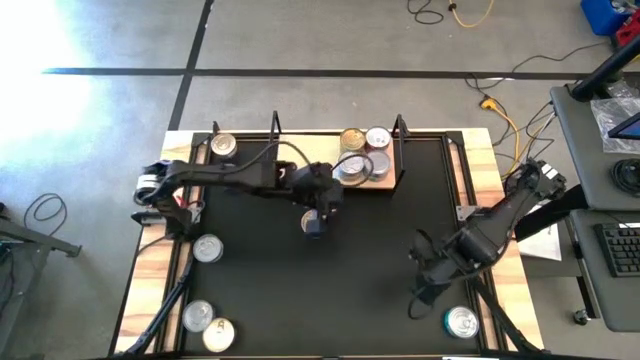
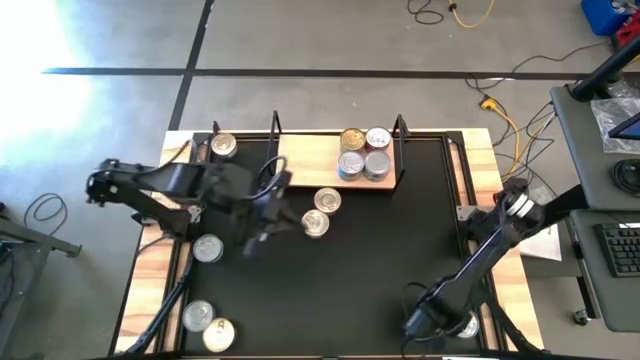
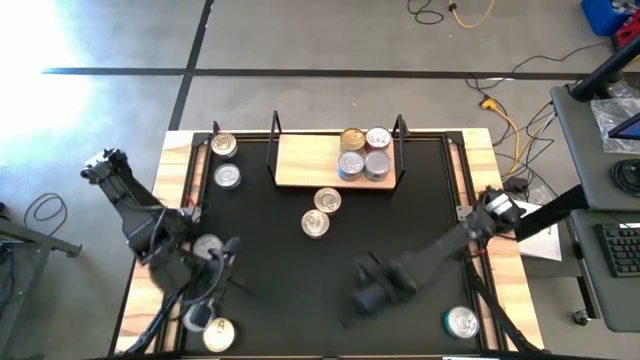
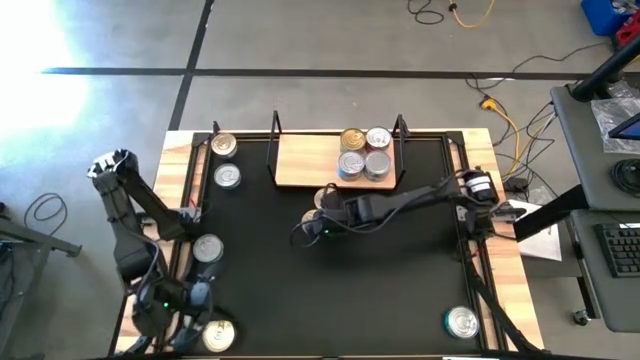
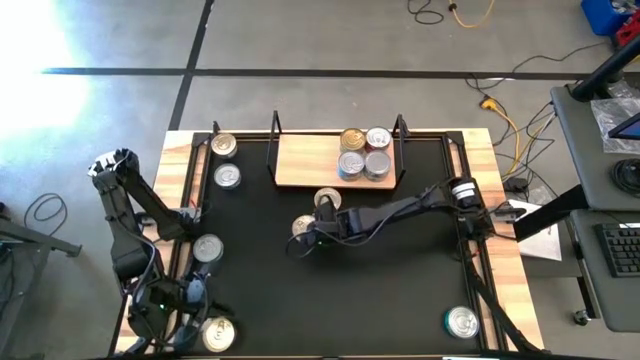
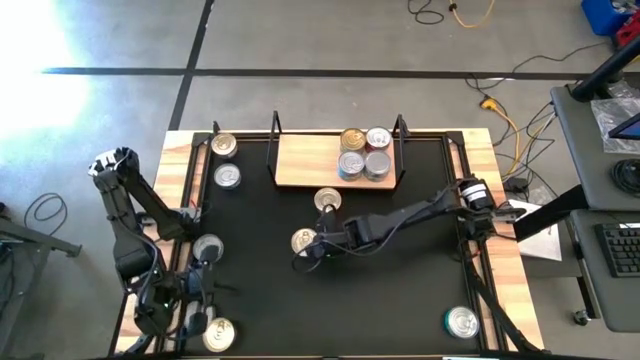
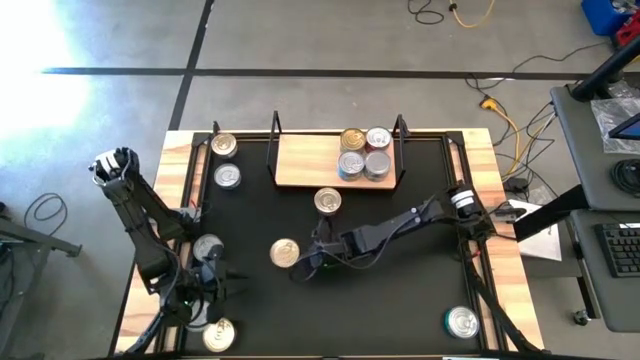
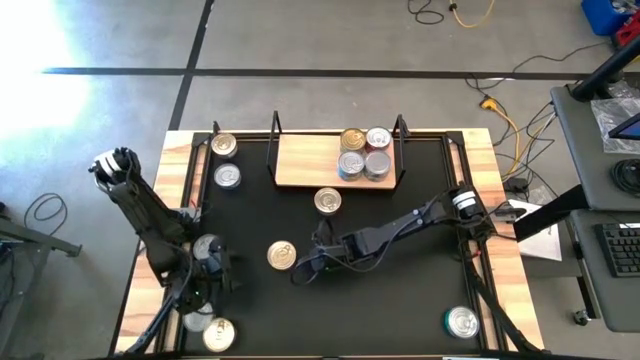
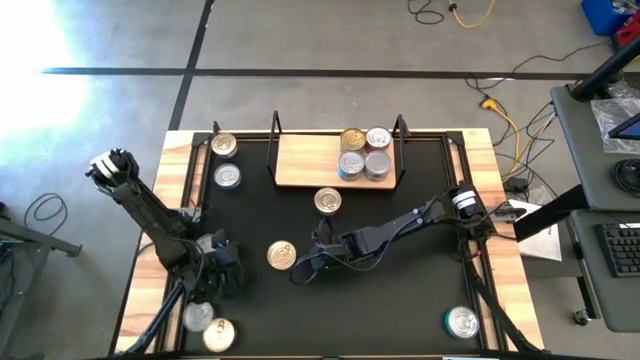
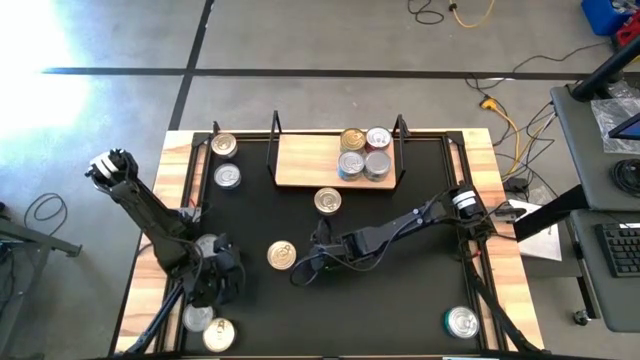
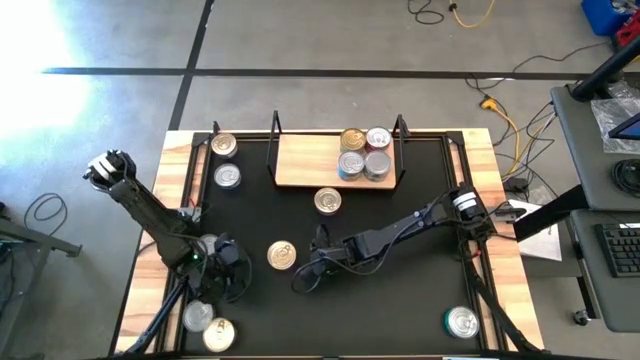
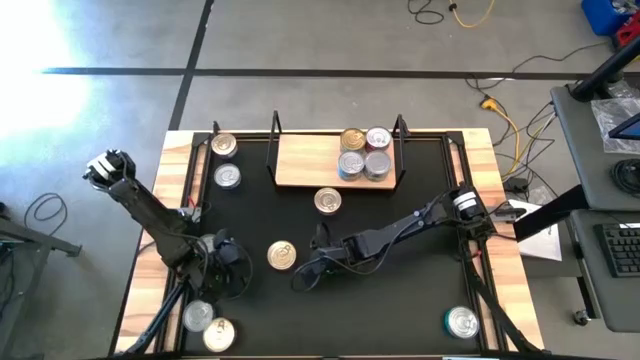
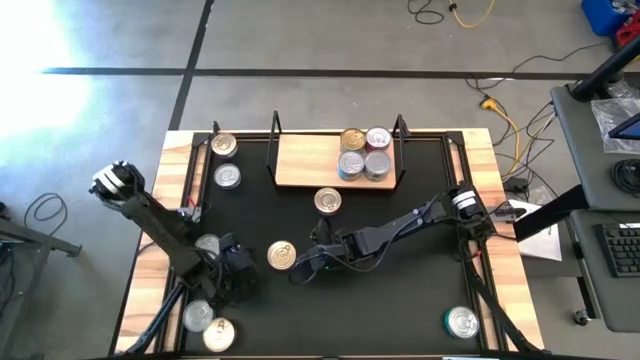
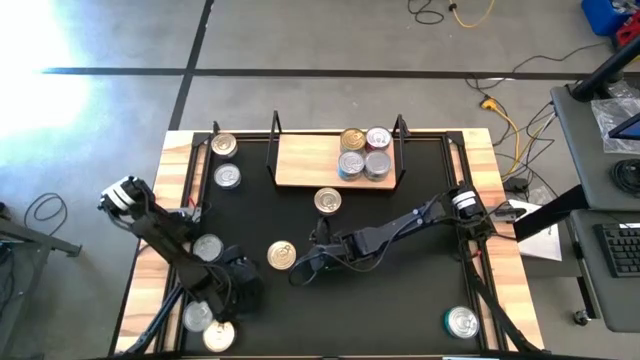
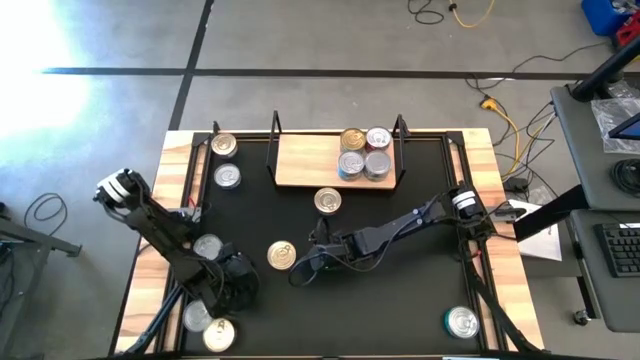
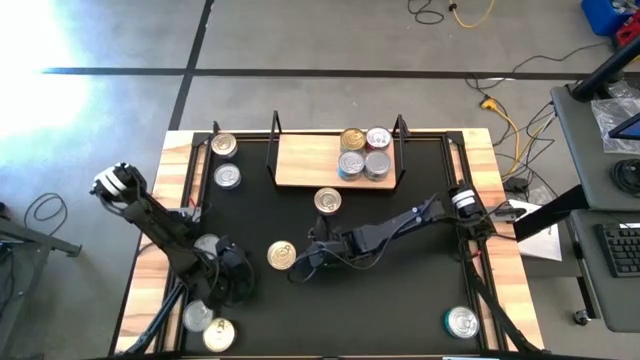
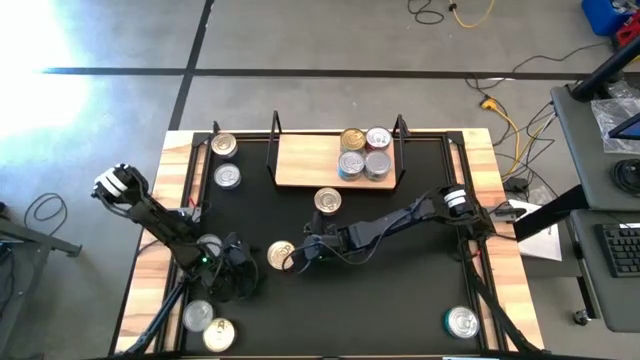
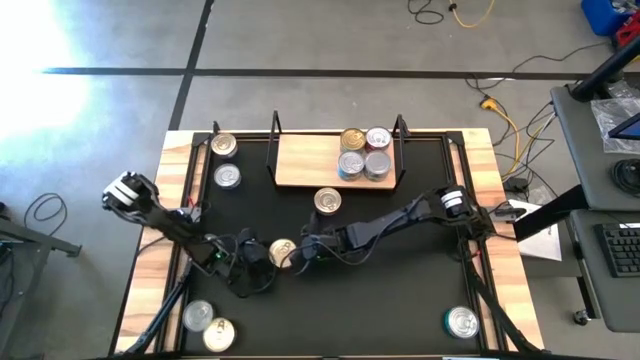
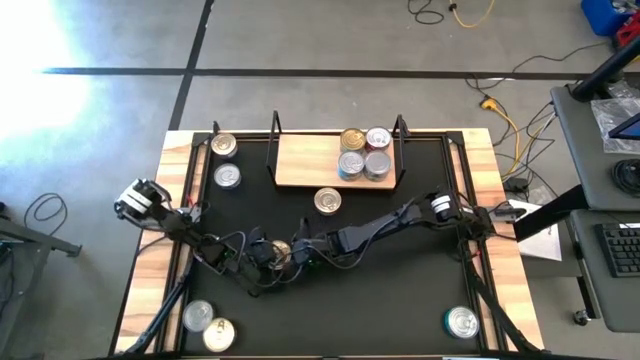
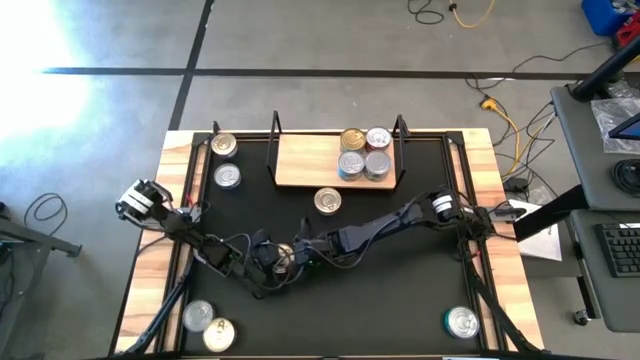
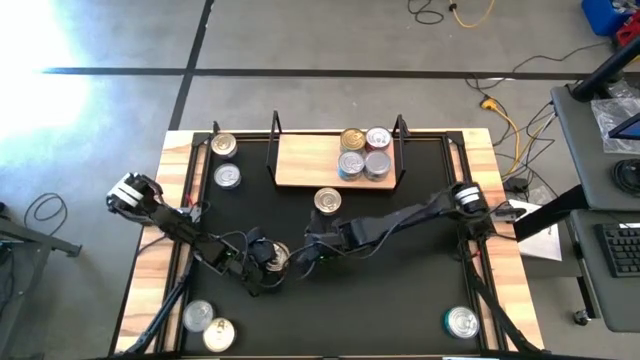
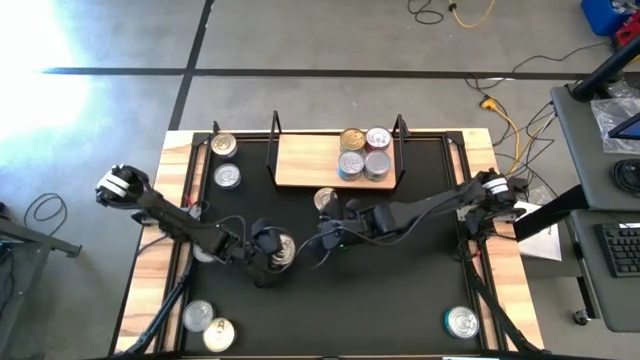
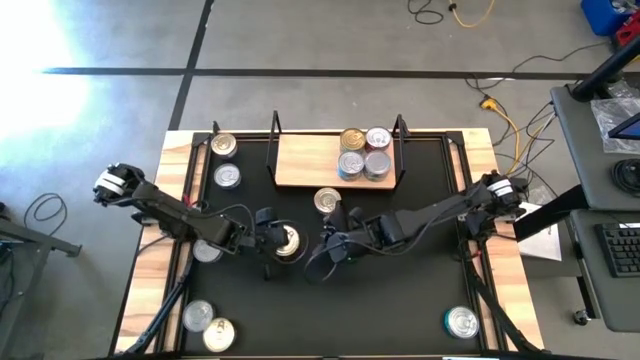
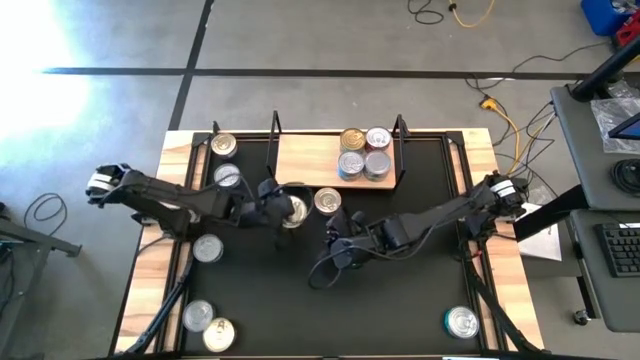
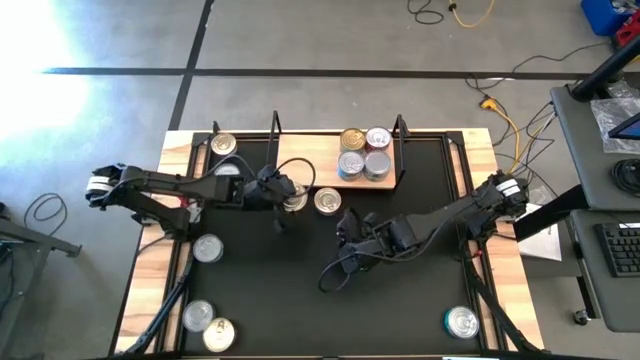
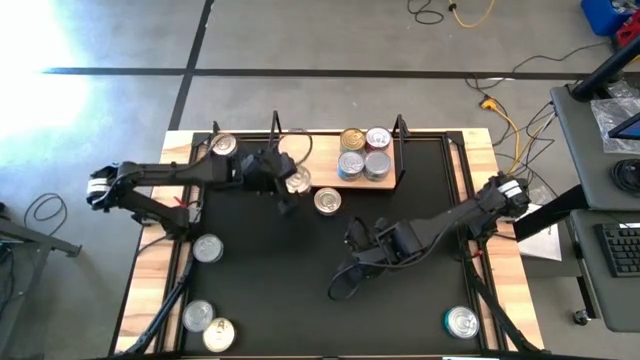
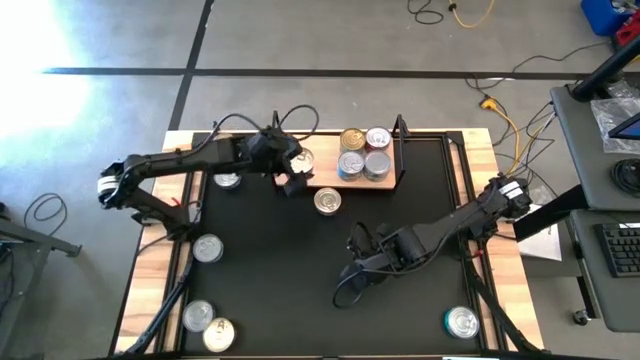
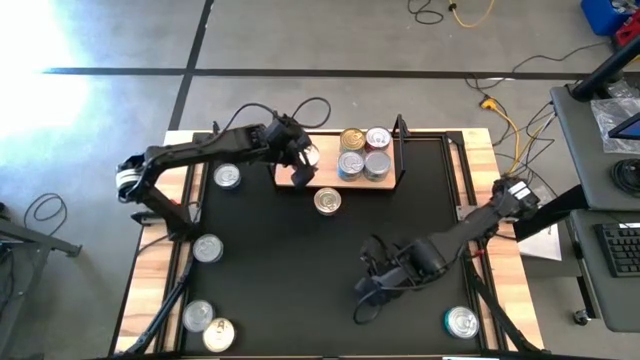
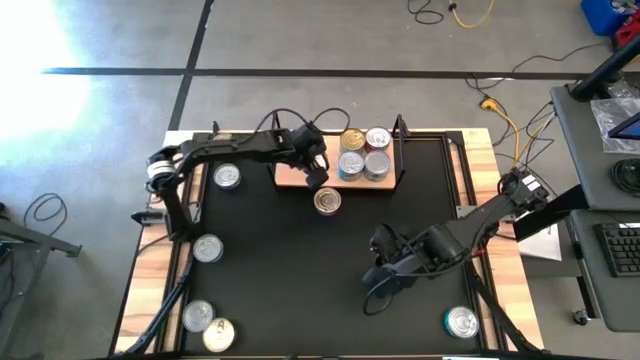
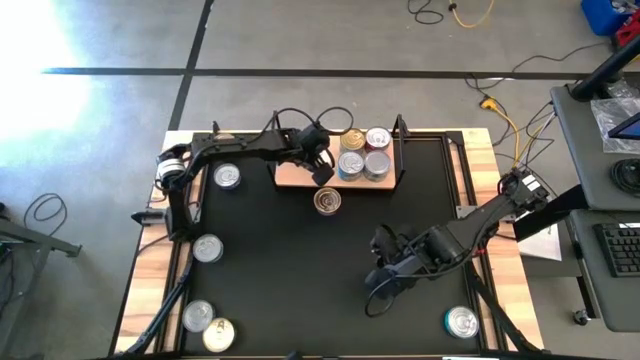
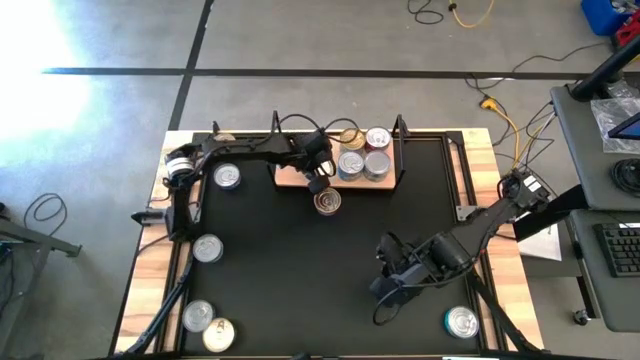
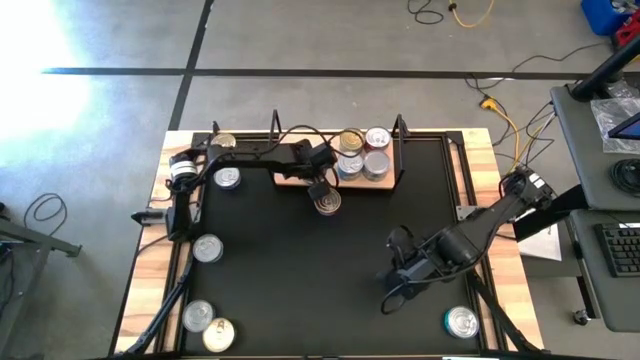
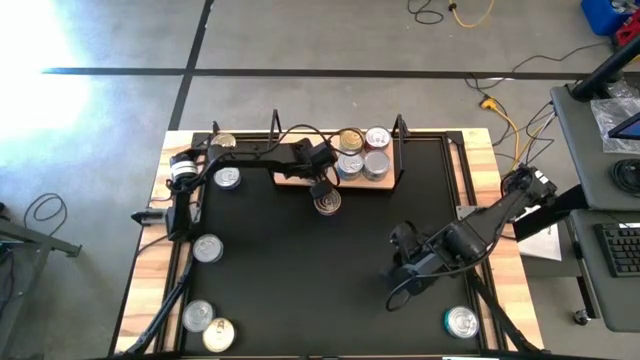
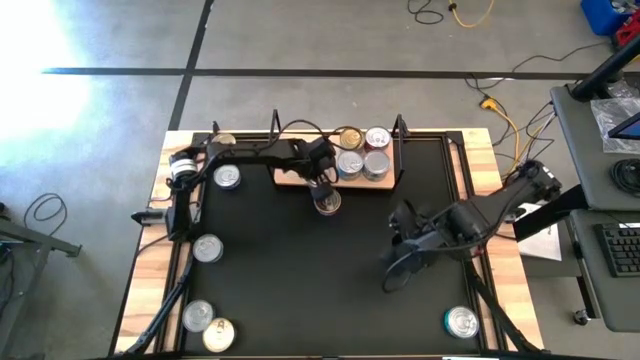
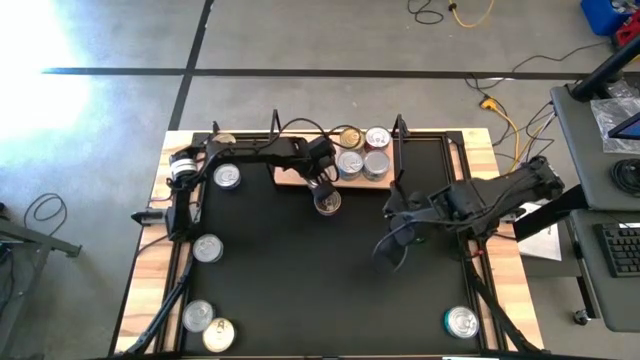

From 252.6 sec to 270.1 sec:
Task: Stack canned seafood by type on shelf
Put the blue-pink tuna can on the shelf
